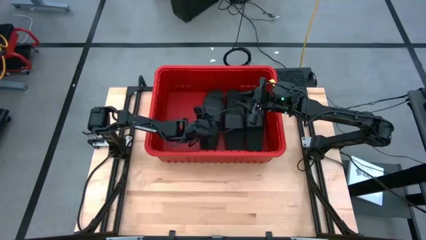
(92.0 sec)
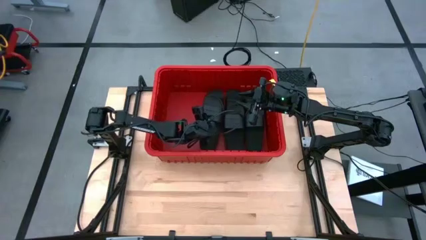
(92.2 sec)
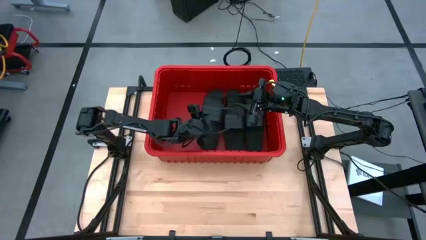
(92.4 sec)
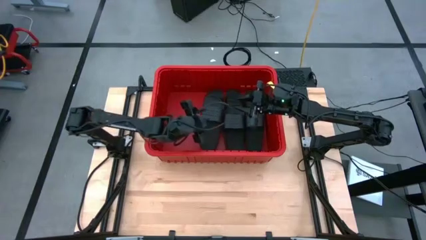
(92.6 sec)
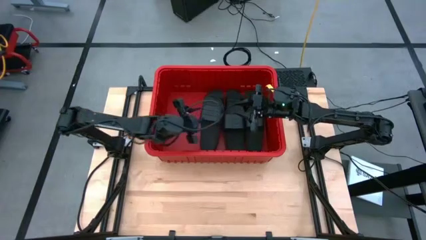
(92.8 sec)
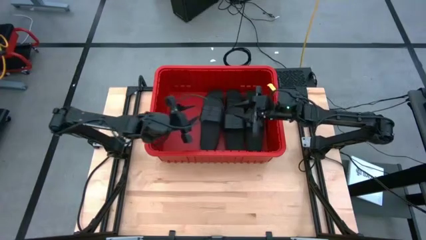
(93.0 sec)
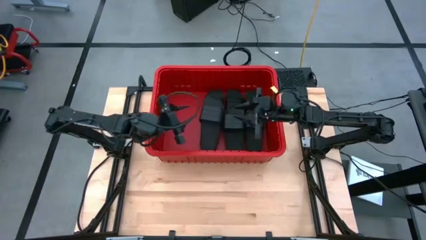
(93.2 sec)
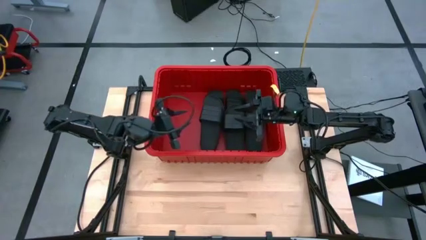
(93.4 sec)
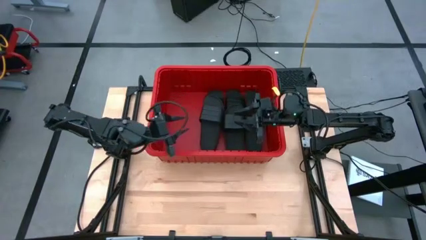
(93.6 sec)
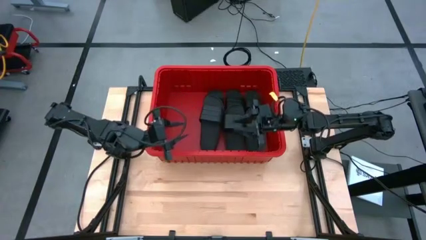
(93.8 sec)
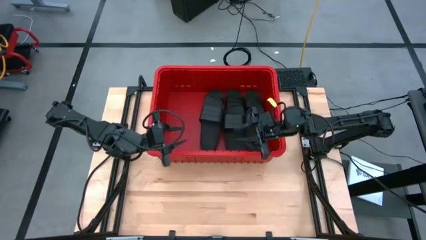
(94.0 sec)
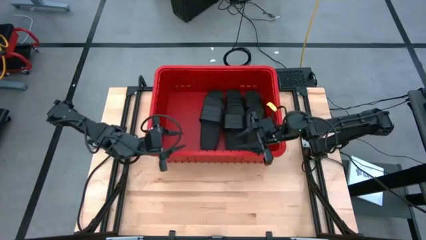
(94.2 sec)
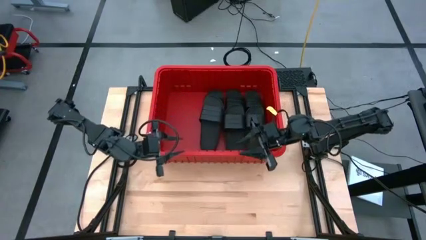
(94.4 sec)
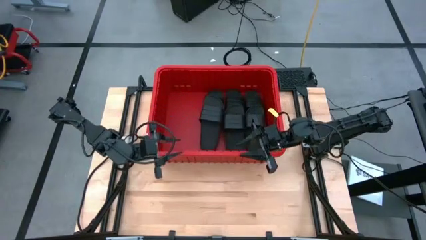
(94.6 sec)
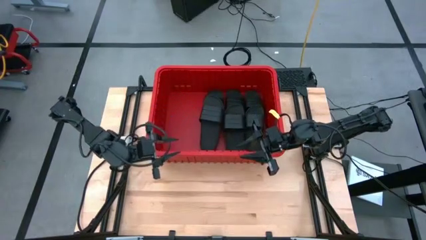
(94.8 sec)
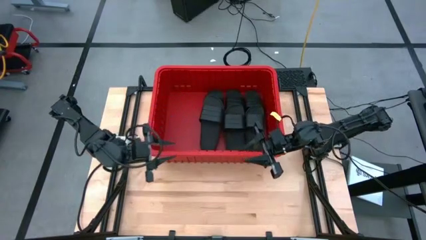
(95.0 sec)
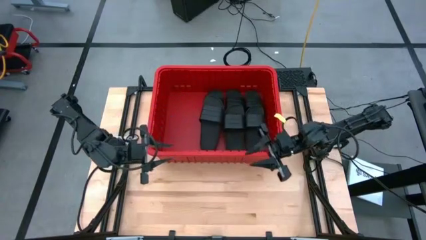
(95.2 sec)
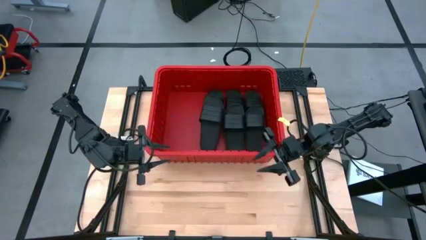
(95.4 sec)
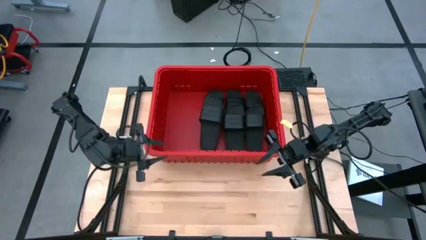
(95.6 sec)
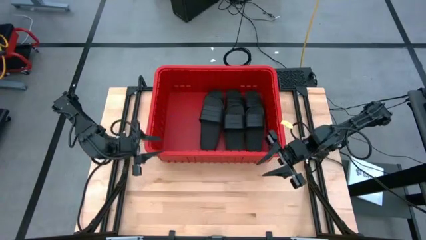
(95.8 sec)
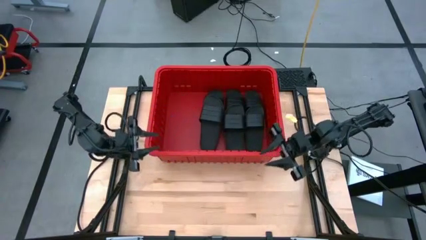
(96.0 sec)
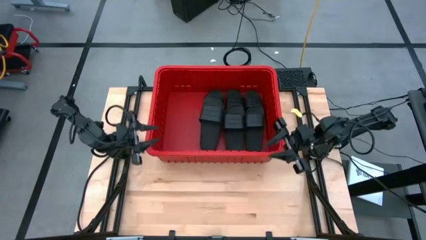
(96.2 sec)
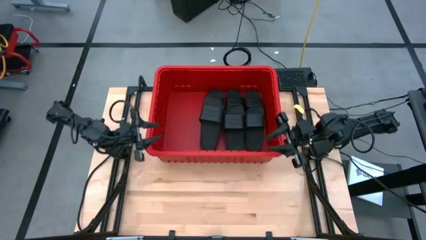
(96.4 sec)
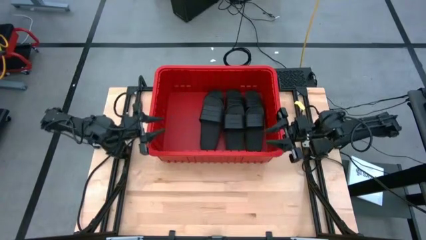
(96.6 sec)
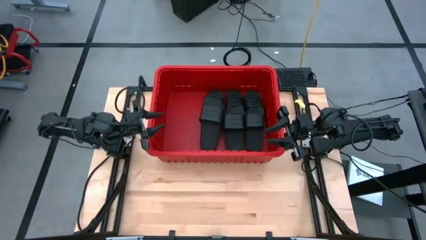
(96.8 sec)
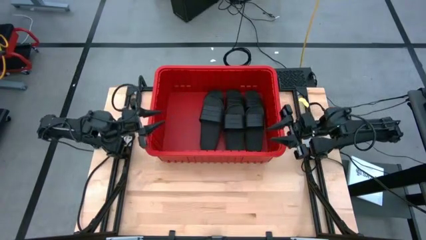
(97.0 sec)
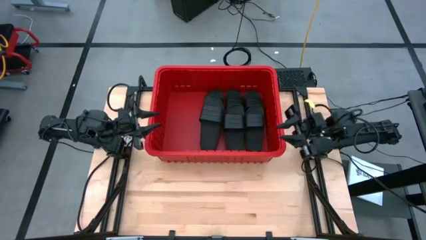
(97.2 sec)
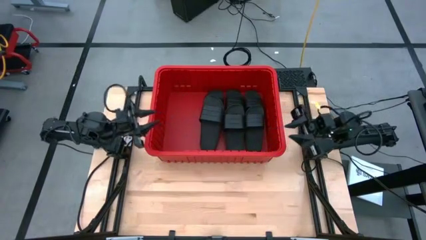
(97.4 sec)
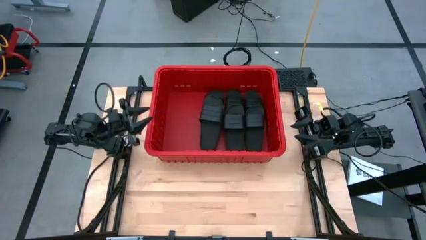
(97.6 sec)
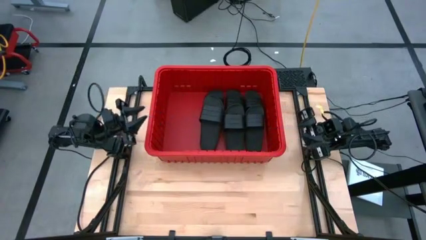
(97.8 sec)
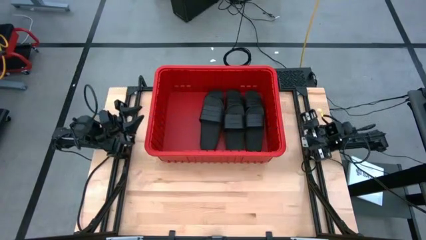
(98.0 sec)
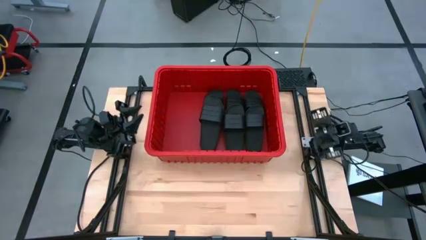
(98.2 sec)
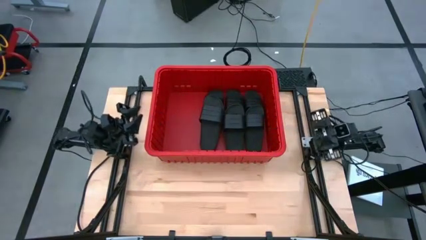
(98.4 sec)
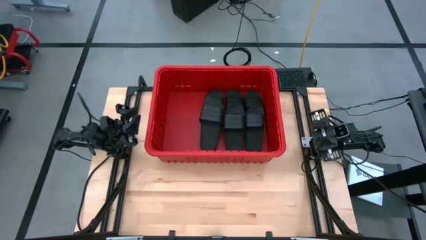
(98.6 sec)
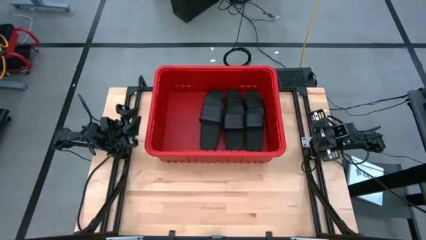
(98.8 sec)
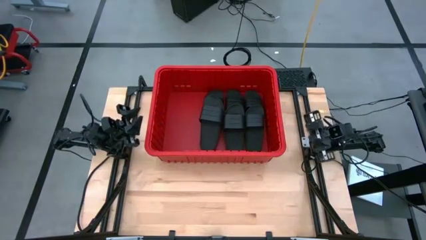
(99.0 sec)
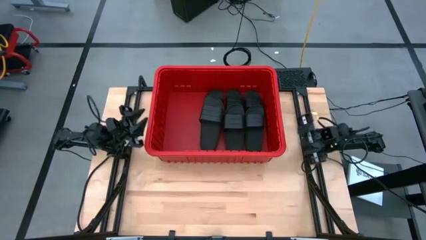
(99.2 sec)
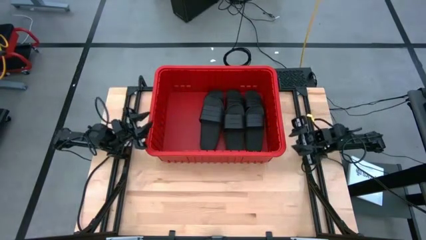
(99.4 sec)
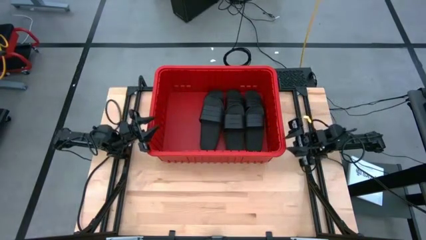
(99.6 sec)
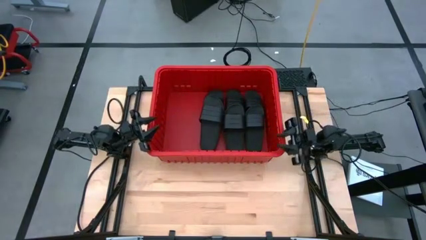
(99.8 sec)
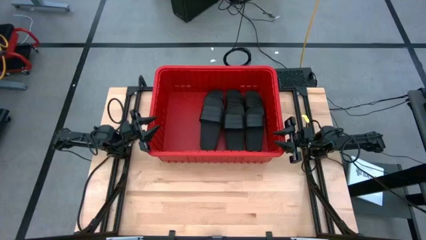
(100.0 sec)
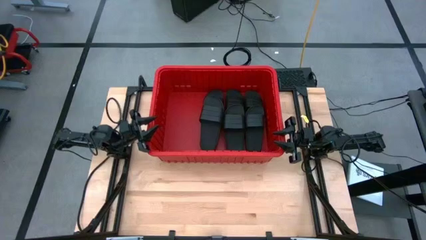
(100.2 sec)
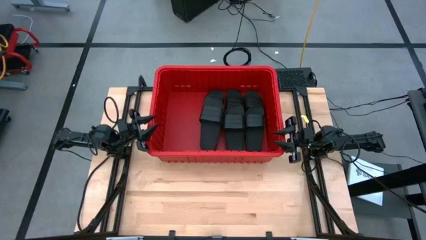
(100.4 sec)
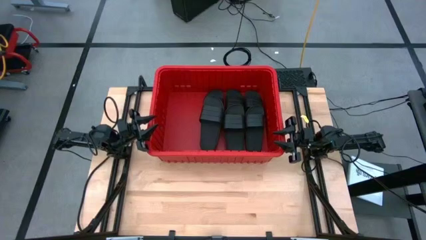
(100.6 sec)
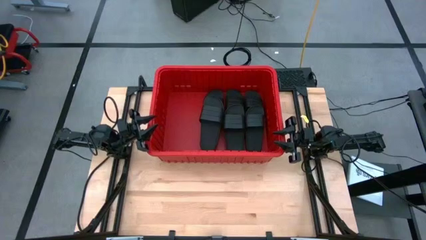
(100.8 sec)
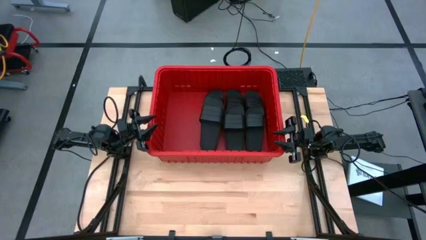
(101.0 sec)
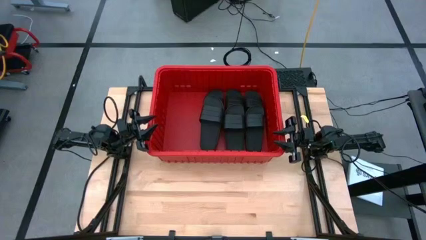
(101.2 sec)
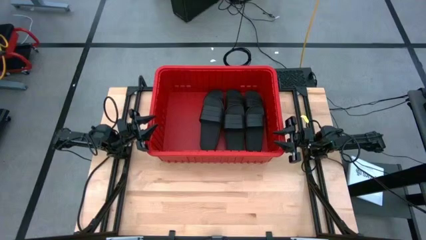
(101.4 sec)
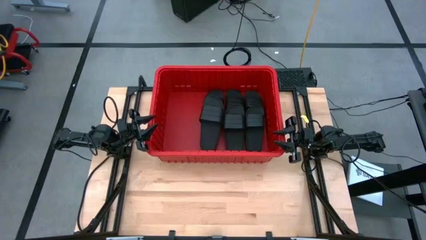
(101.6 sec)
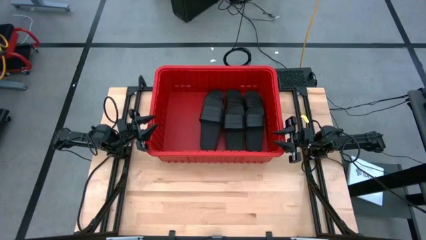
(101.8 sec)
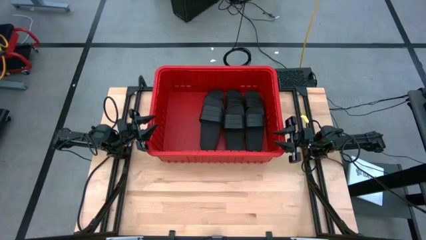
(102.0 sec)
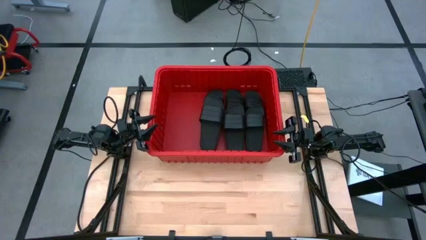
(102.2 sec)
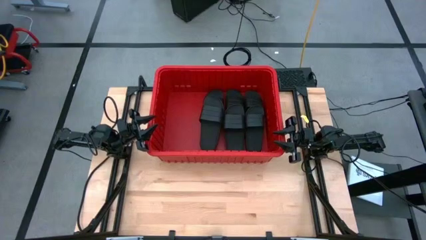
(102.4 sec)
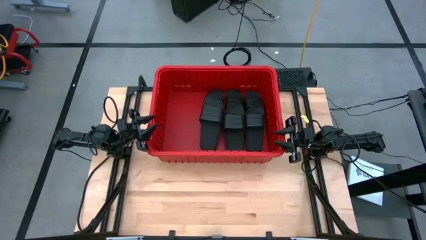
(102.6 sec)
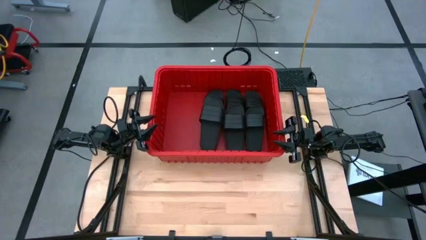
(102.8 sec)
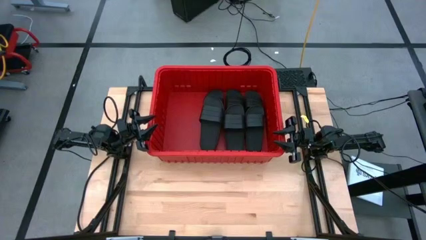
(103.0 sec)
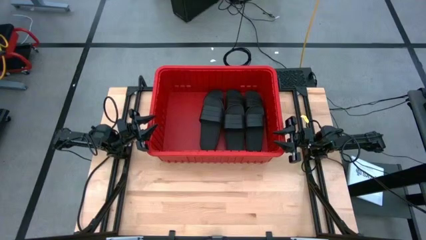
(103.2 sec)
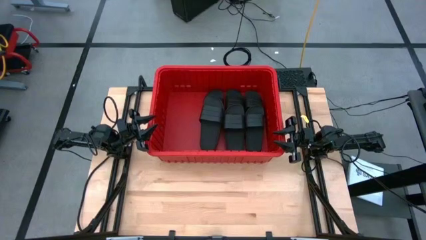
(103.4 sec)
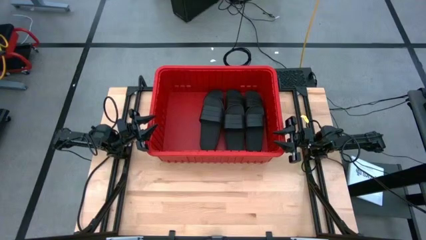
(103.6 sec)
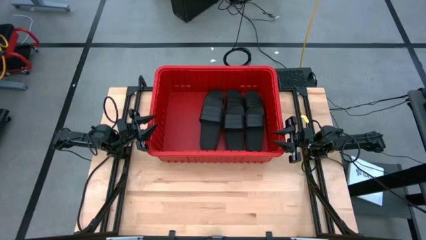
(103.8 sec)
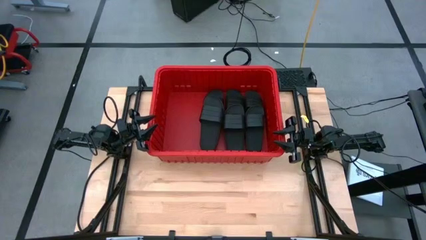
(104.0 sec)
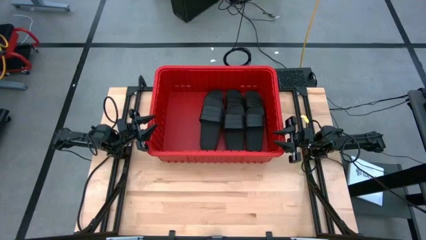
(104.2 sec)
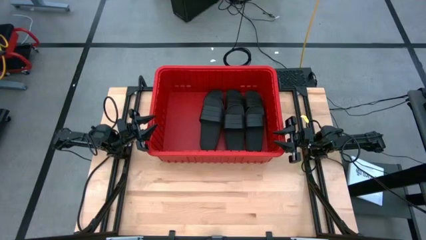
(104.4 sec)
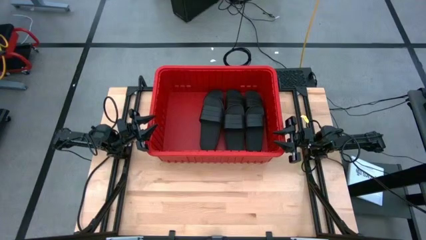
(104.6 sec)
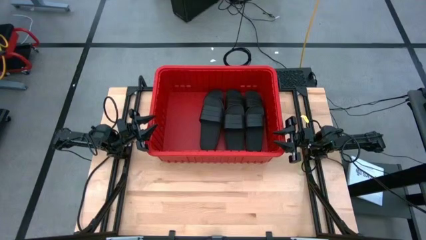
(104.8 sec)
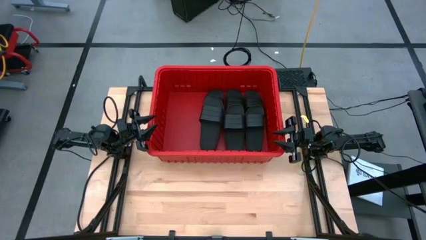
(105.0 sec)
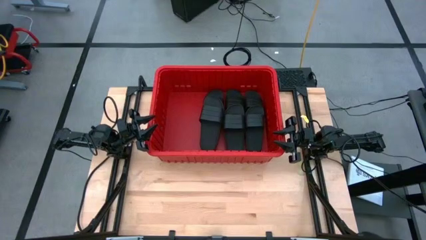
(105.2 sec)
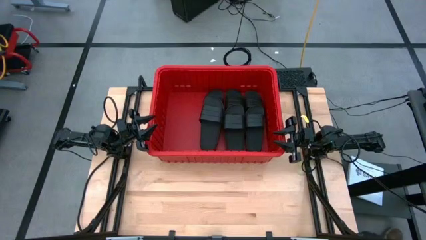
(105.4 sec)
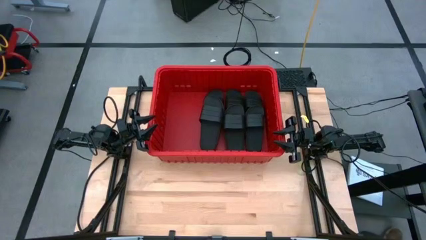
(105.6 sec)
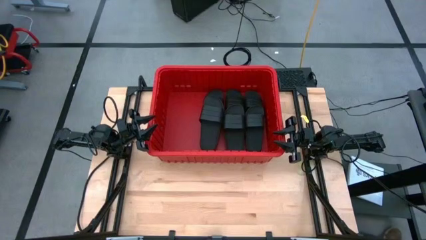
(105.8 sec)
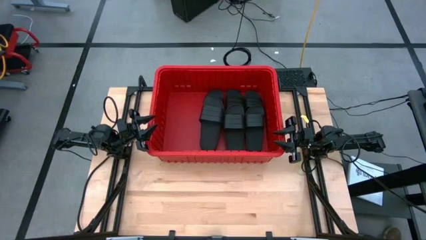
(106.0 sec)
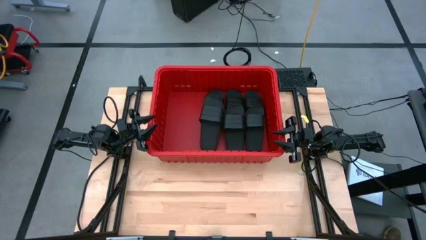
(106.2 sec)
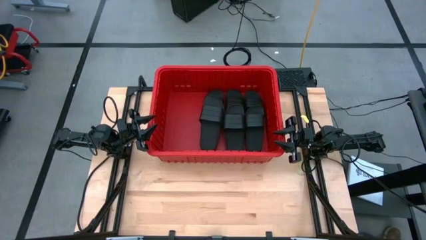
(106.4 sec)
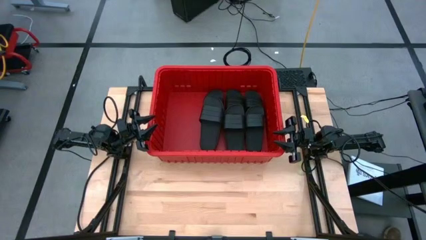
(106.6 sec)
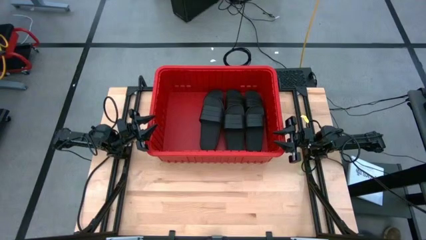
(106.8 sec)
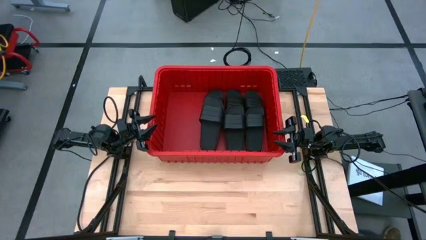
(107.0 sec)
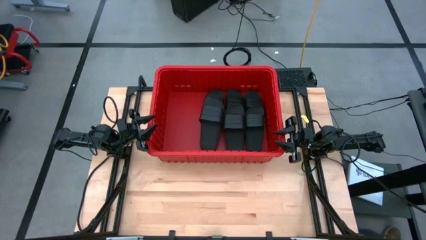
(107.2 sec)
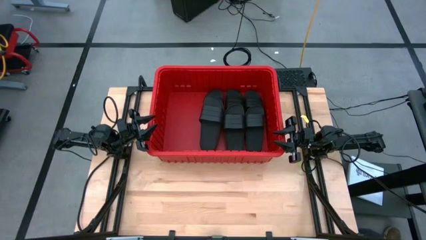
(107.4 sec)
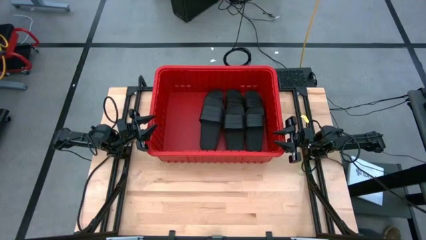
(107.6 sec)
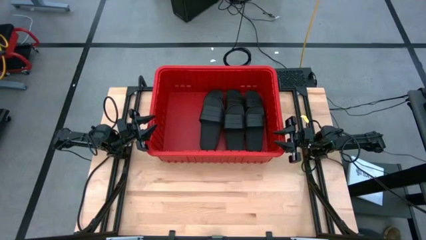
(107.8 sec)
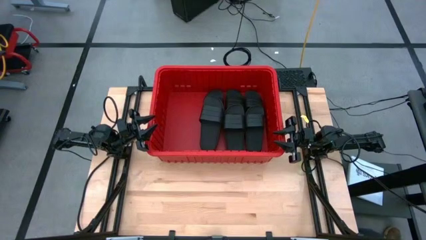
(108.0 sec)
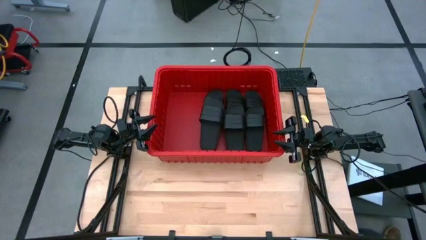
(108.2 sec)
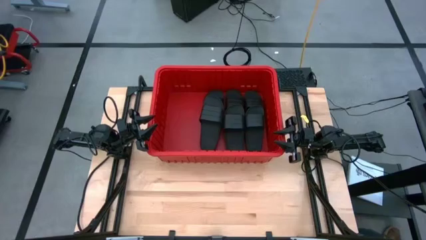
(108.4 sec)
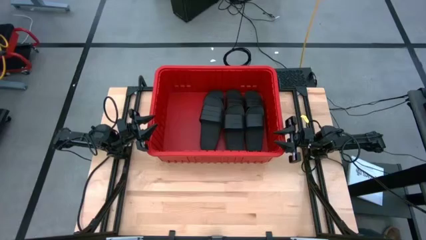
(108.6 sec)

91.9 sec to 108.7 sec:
Task: Pick and place slides into bin
Return to Home Position
